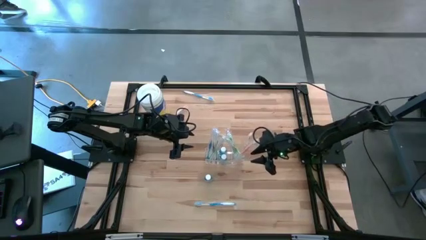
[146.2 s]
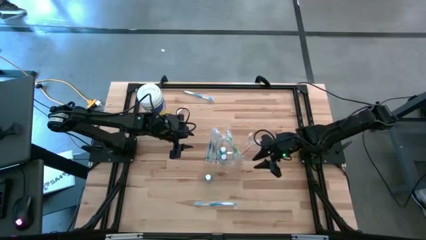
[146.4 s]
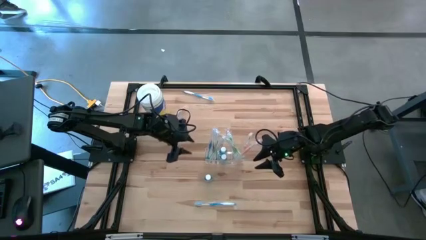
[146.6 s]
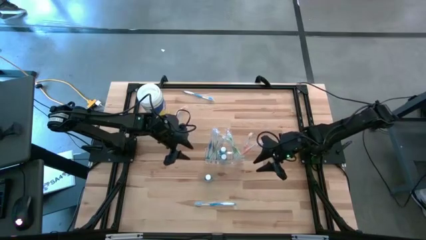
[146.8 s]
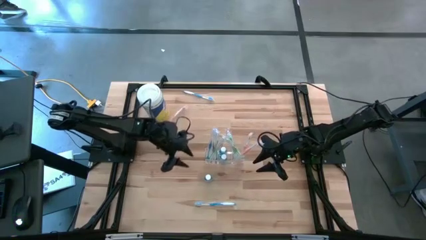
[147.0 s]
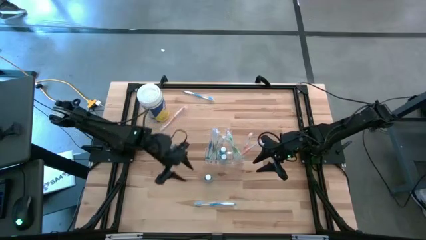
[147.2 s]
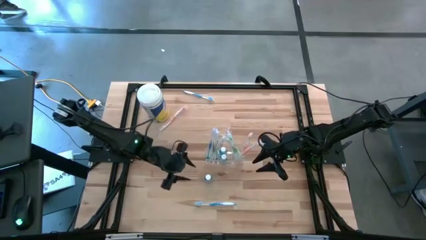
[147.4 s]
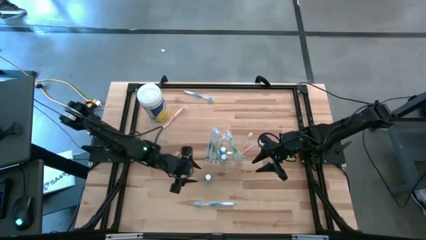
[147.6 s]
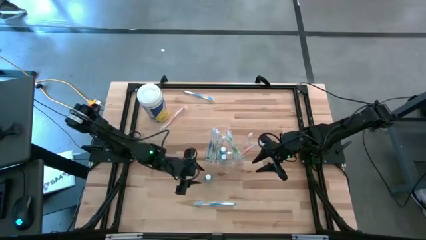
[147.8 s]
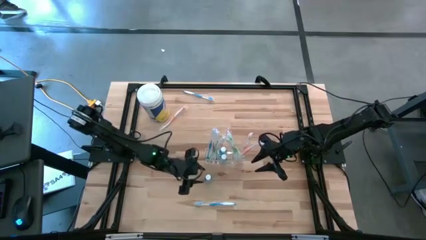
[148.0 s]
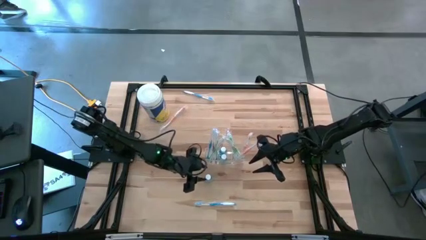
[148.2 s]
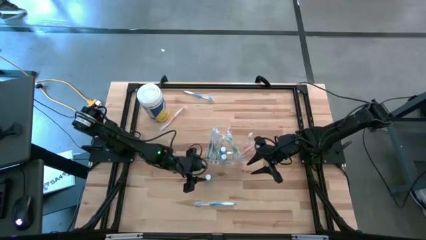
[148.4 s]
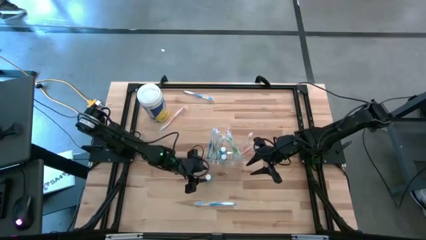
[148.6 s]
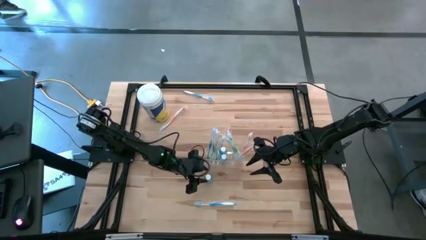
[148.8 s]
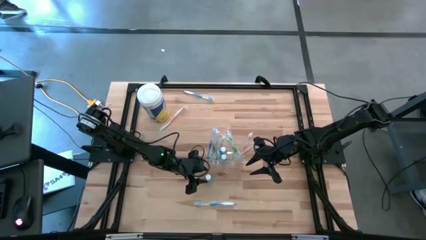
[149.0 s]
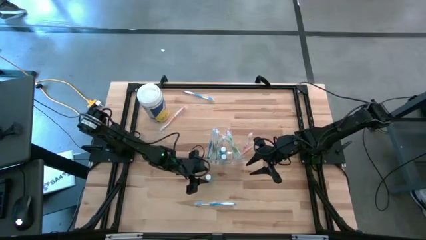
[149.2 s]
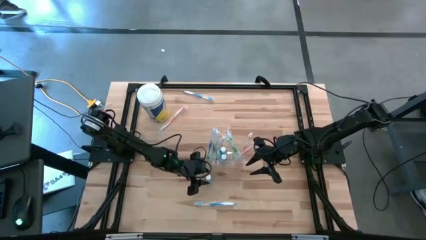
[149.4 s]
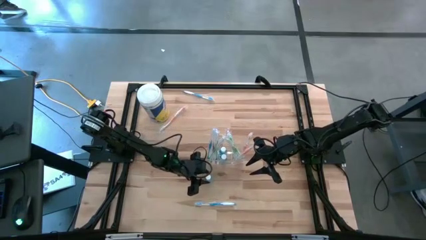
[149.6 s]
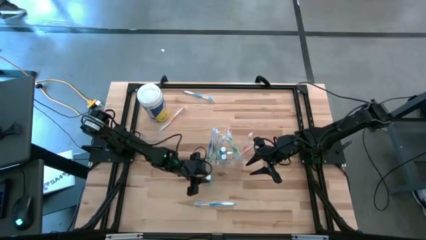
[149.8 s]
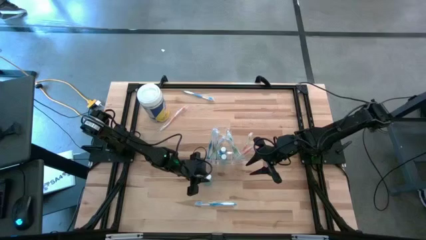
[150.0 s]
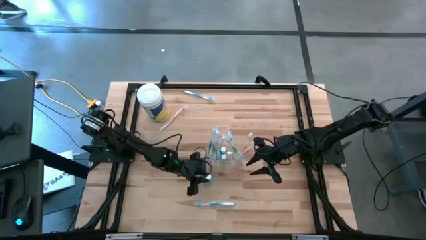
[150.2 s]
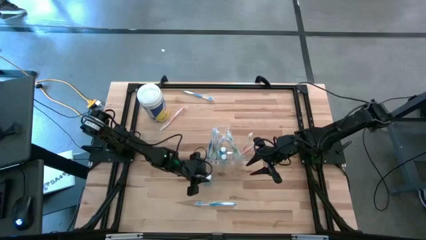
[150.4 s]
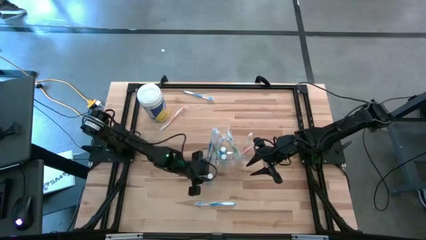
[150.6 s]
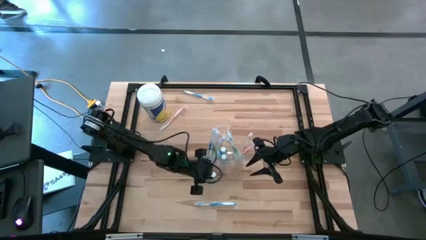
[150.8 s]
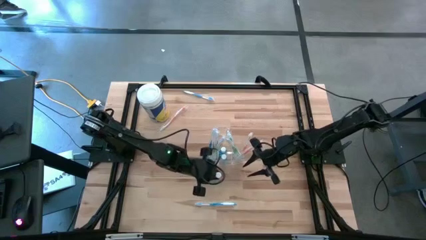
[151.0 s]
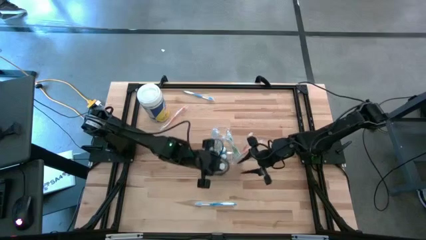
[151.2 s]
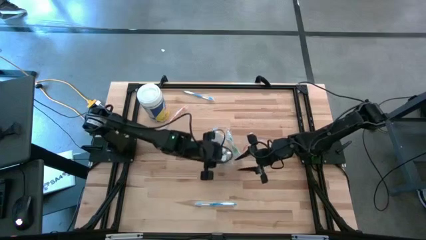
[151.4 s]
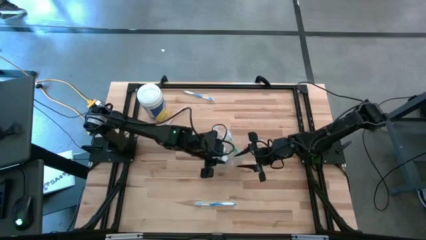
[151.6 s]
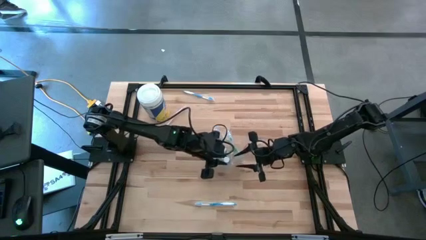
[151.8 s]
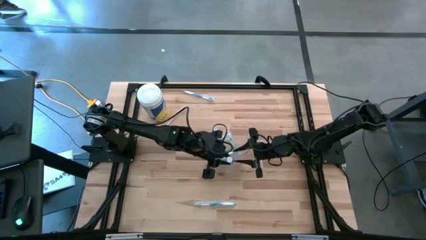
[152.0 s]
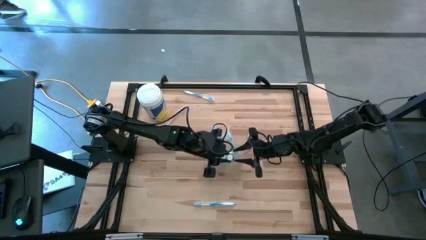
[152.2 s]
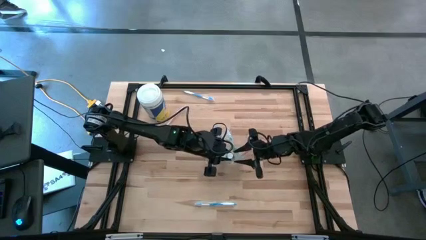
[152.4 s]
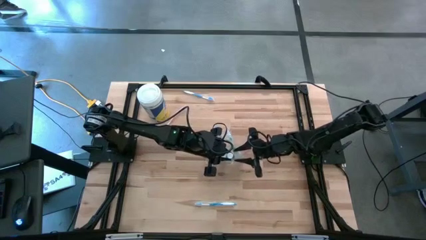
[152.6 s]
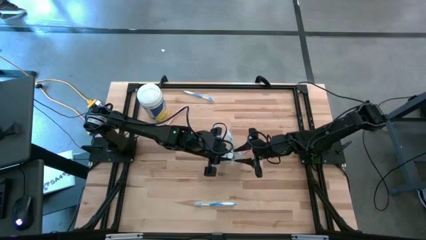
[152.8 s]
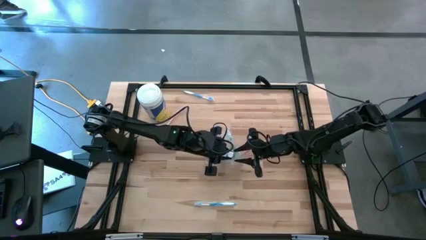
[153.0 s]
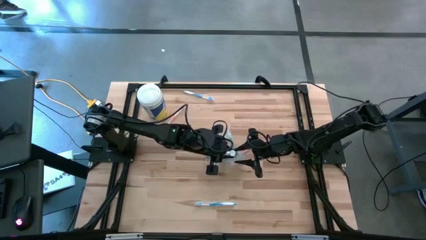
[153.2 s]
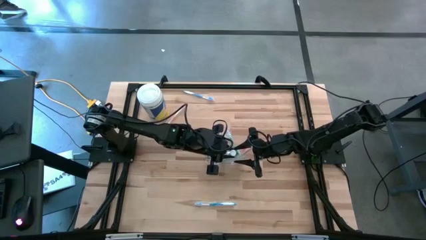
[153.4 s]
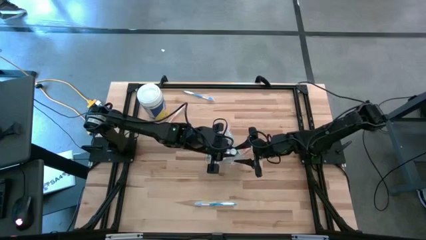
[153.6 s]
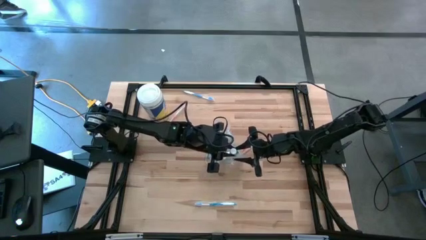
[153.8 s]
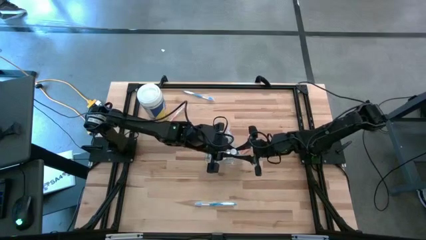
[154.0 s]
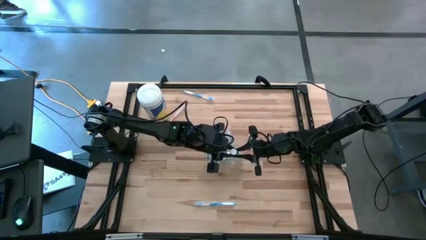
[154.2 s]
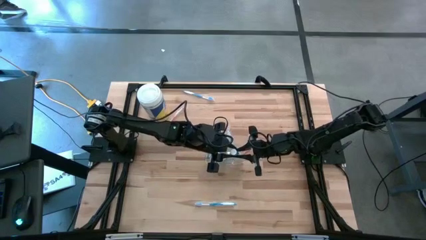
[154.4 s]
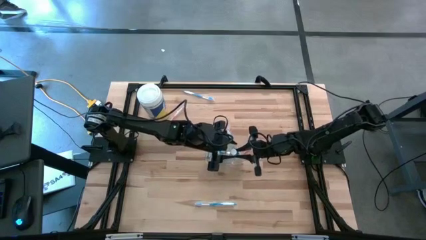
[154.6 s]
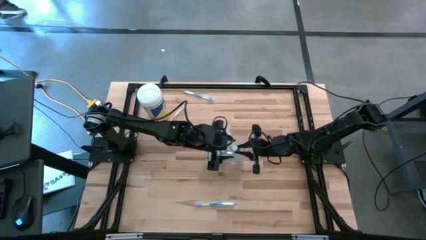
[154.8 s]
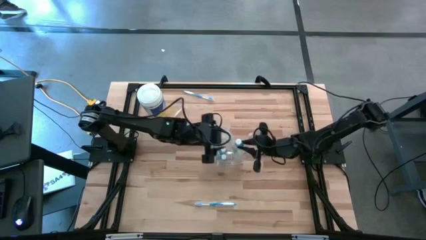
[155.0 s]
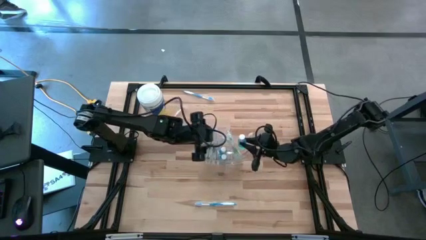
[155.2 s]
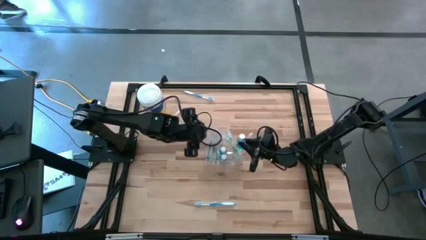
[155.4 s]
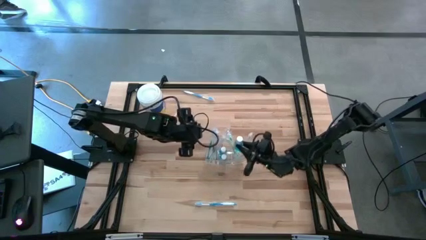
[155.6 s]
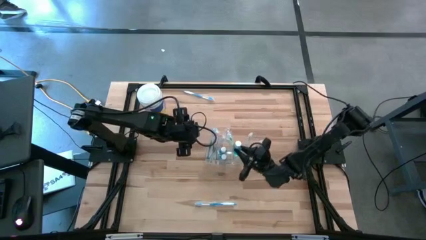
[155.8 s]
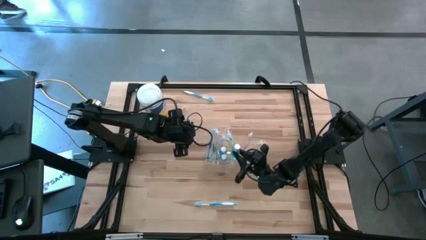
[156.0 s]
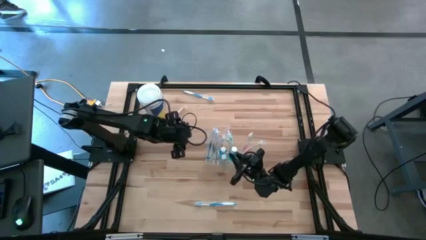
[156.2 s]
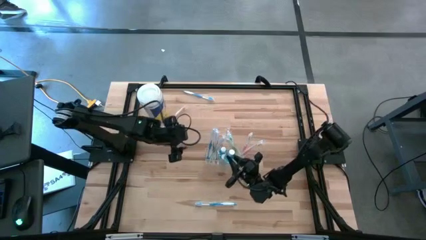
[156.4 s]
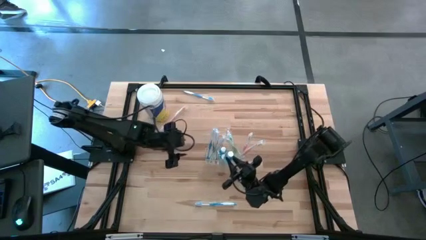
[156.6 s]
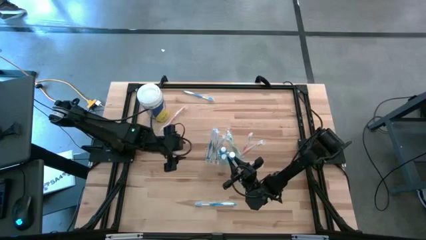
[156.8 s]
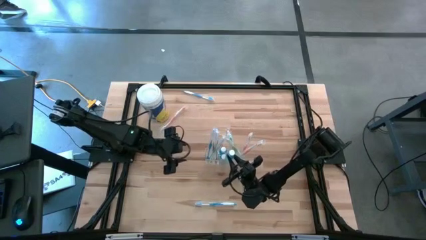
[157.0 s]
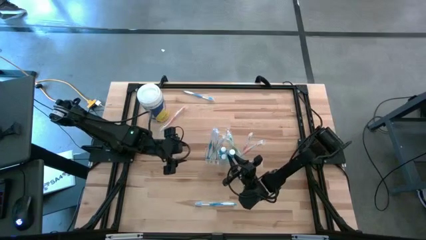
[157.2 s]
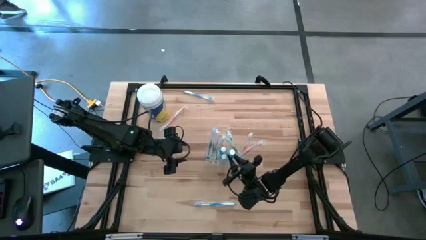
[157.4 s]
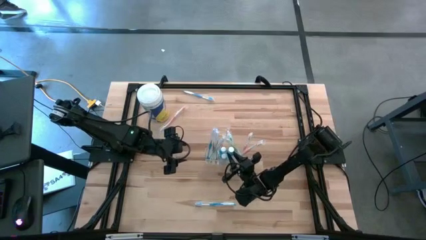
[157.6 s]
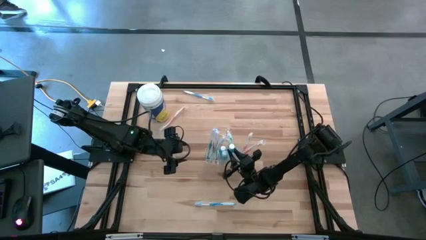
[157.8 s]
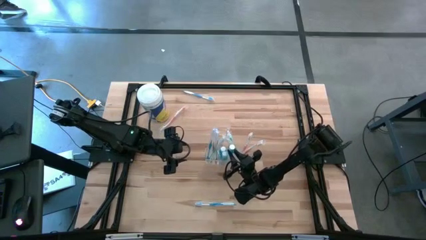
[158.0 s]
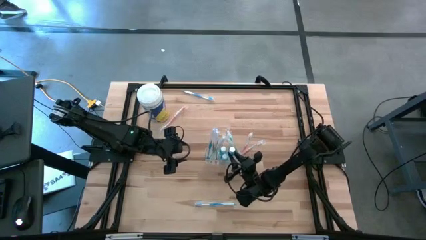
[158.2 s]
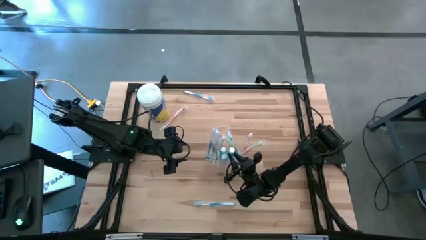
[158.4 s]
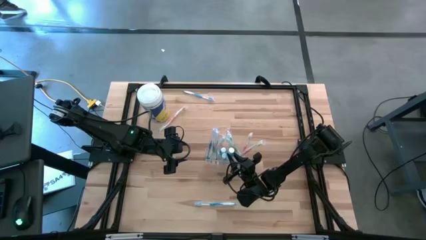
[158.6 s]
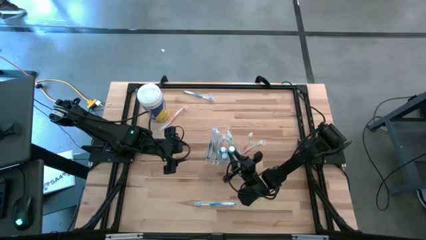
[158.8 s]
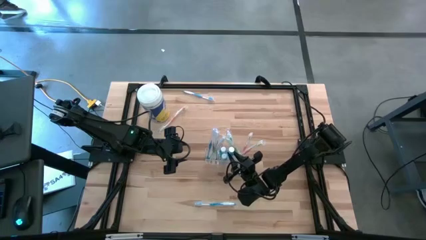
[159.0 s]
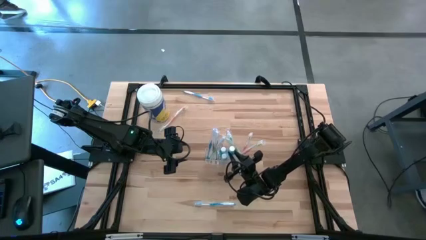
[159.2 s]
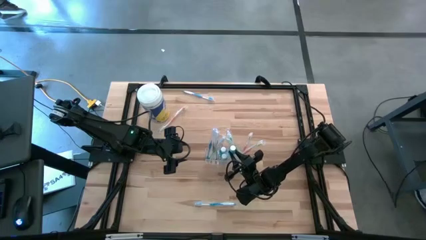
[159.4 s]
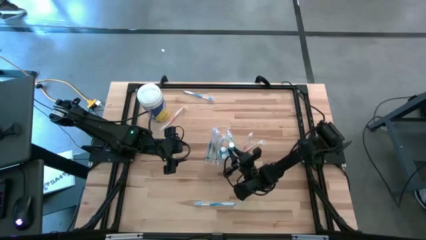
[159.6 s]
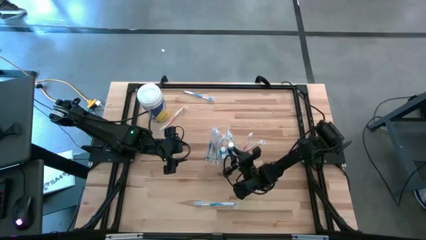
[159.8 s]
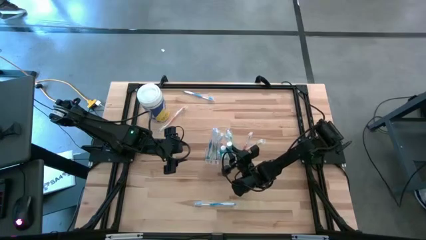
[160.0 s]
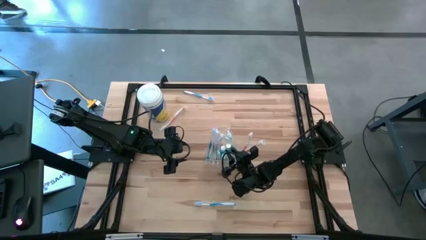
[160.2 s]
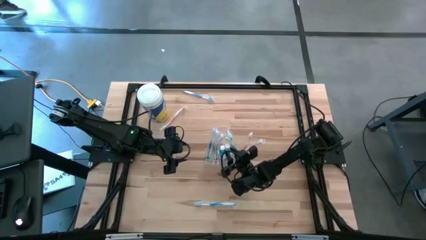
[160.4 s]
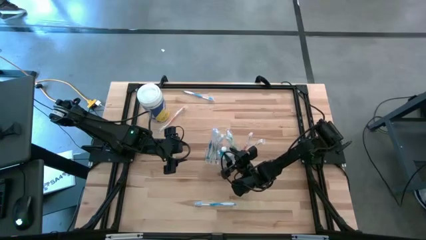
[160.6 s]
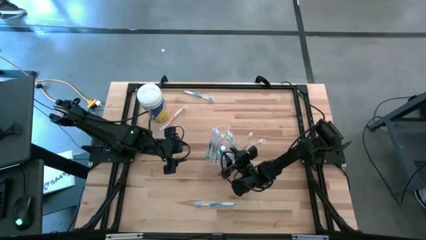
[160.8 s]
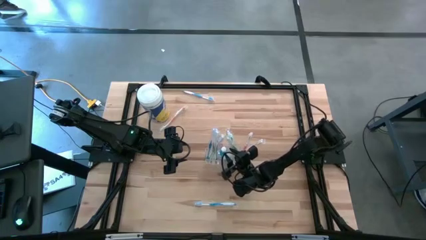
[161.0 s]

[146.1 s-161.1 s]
Task: Pick & Place toothbrushing station
Put the blue mouthwash into the transparent organizer

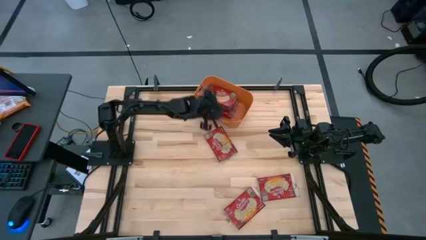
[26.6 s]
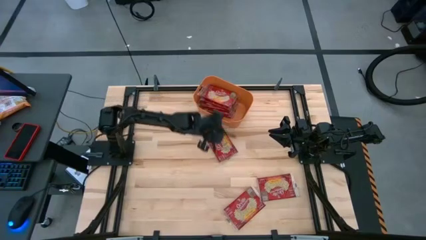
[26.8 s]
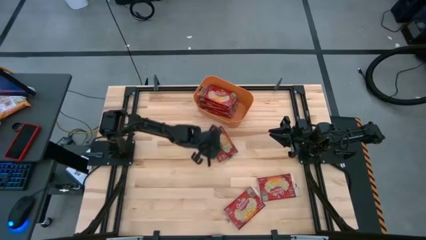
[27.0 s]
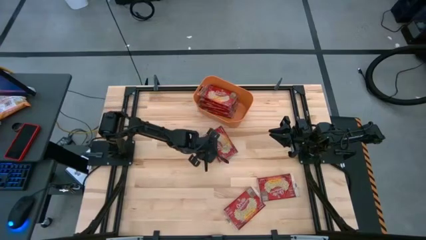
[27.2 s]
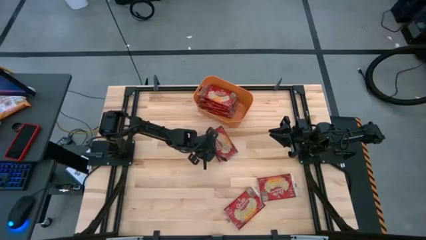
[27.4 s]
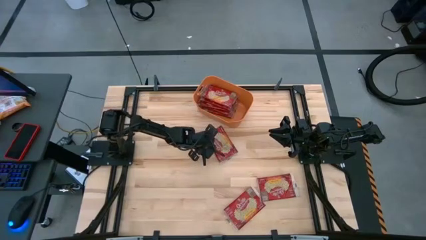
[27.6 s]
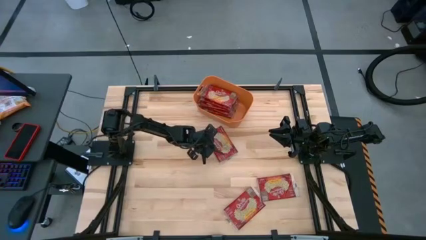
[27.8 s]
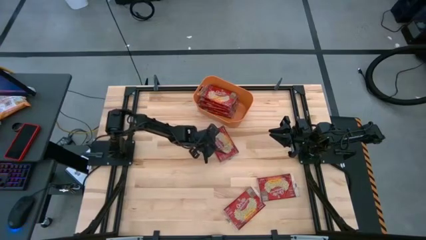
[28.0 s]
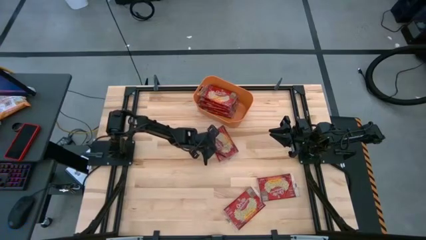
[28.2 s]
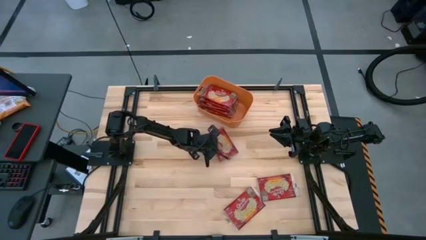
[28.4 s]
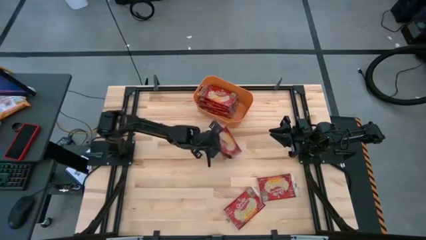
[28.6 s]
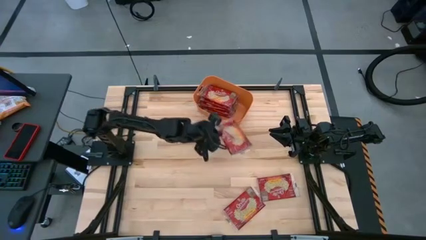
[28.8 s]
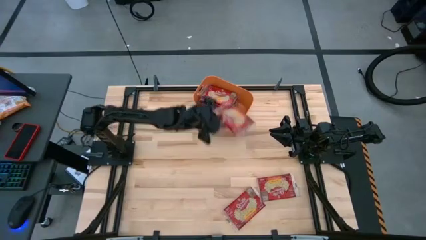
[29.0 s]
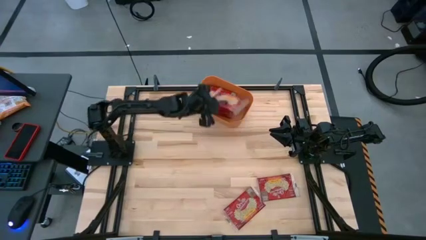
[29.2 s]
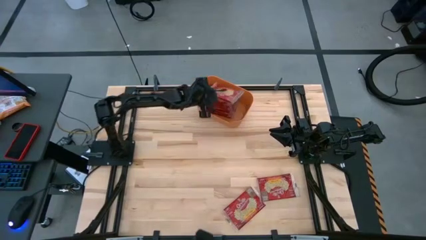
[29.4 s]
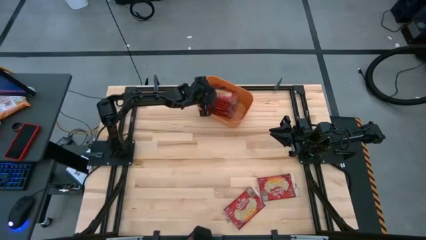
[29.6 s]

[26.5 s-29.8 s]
Task: Sort popcorn bags into baskets
Put the red popcorn pack into the orange bin
